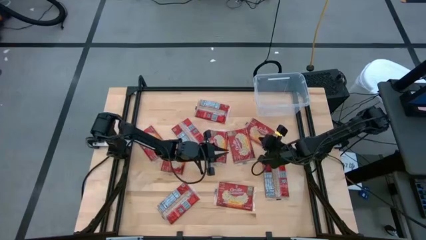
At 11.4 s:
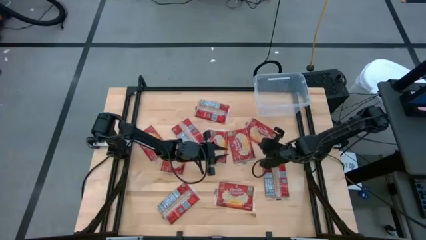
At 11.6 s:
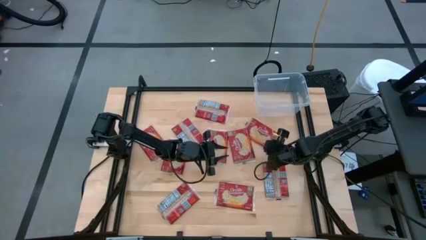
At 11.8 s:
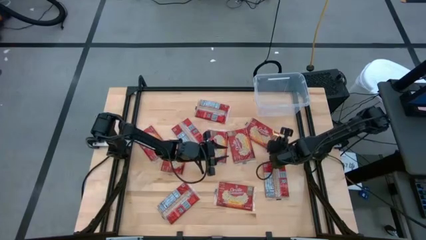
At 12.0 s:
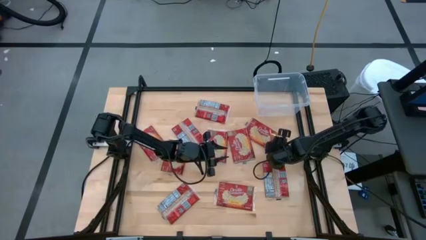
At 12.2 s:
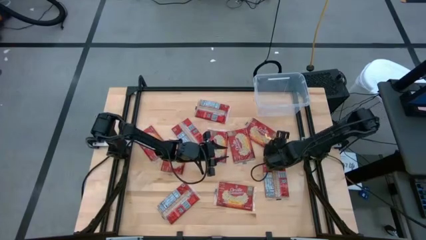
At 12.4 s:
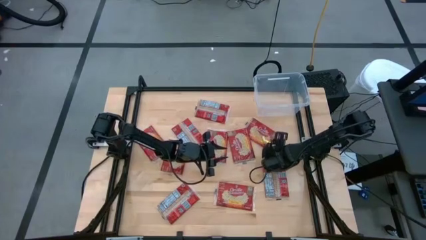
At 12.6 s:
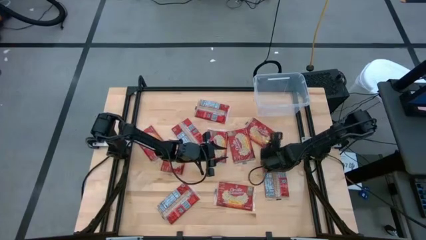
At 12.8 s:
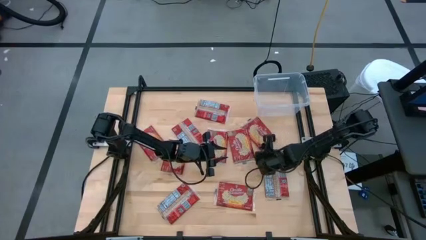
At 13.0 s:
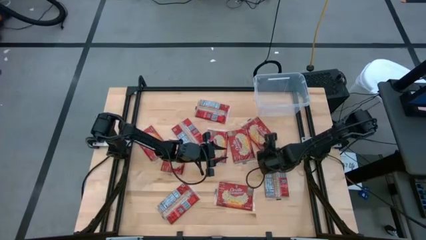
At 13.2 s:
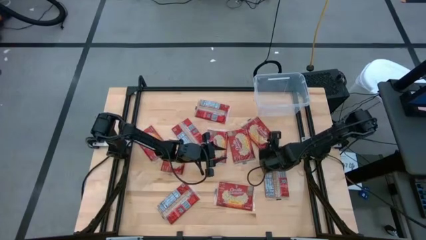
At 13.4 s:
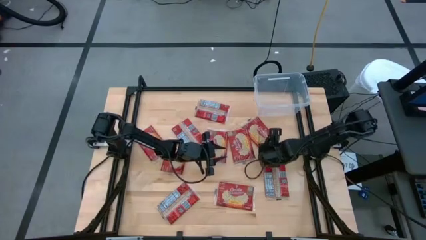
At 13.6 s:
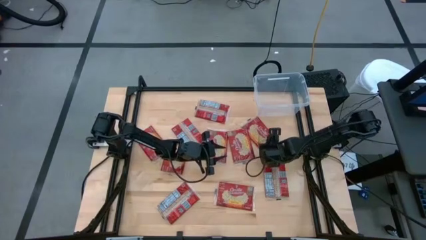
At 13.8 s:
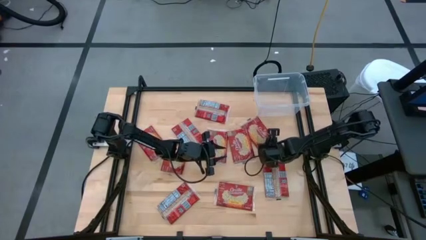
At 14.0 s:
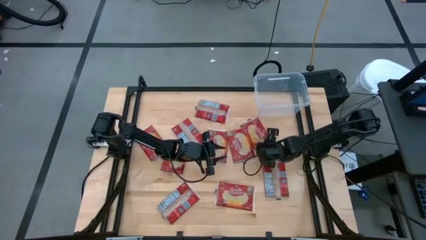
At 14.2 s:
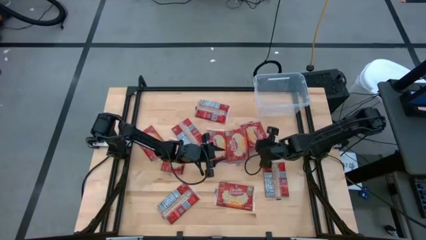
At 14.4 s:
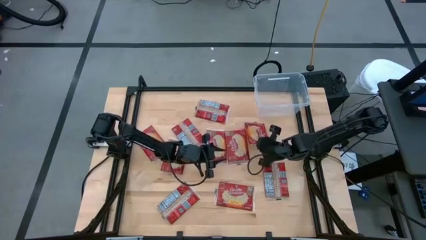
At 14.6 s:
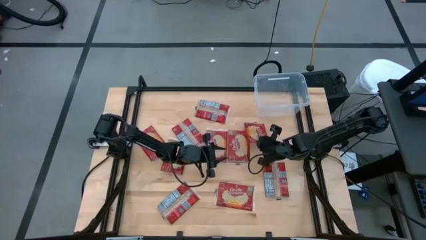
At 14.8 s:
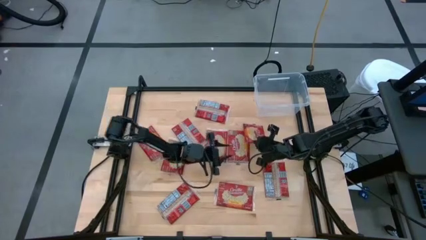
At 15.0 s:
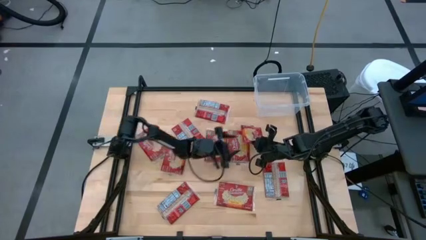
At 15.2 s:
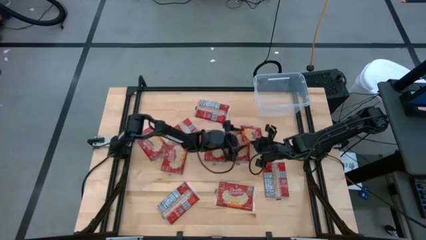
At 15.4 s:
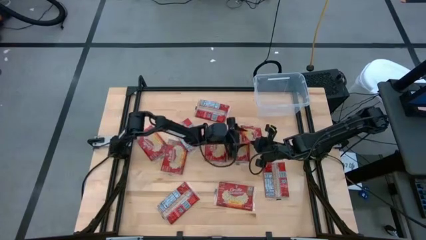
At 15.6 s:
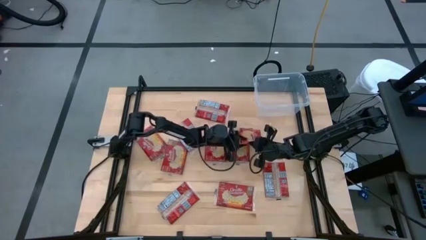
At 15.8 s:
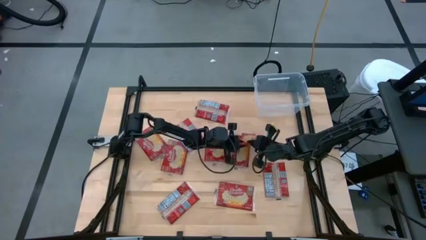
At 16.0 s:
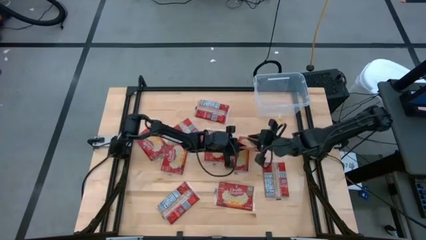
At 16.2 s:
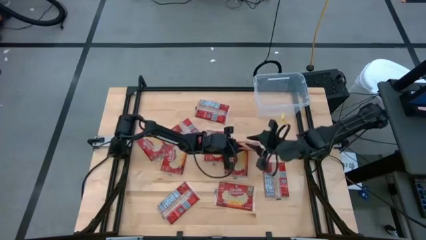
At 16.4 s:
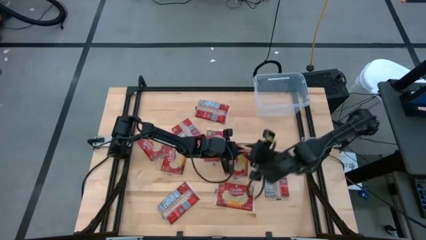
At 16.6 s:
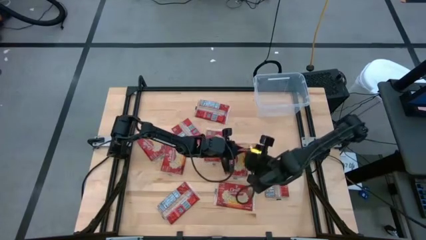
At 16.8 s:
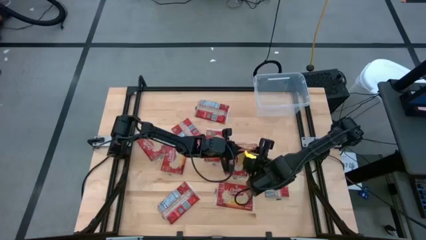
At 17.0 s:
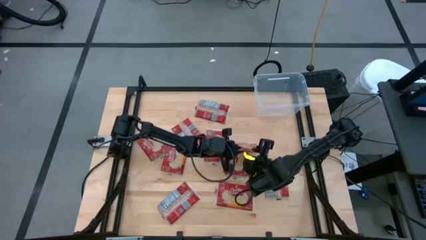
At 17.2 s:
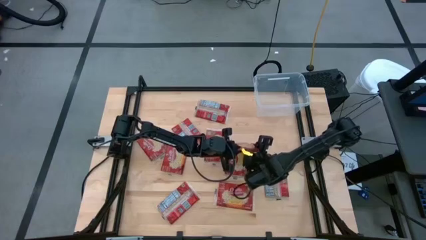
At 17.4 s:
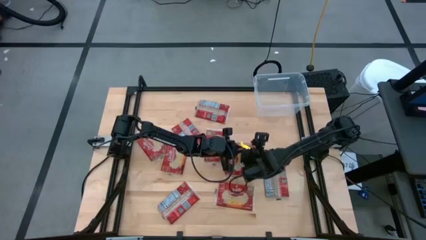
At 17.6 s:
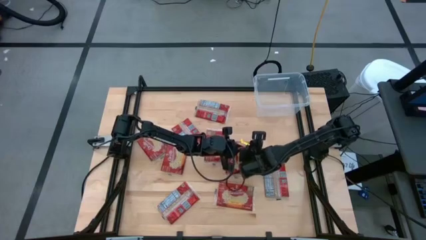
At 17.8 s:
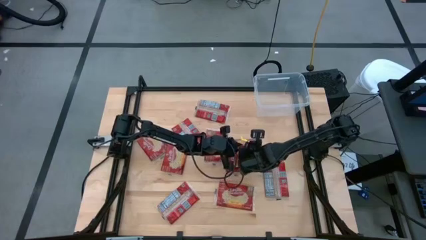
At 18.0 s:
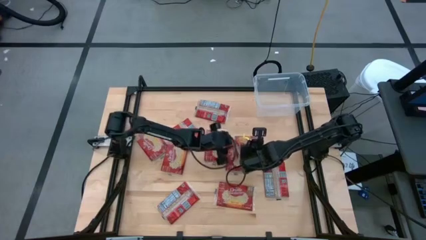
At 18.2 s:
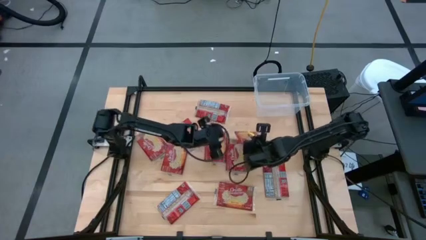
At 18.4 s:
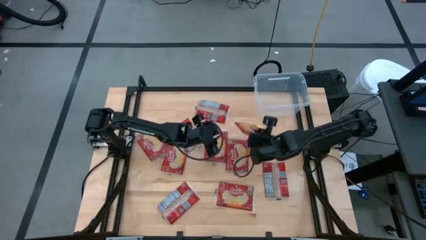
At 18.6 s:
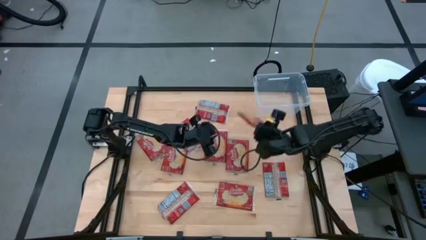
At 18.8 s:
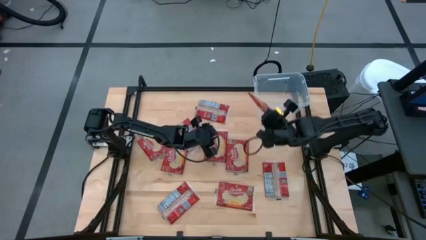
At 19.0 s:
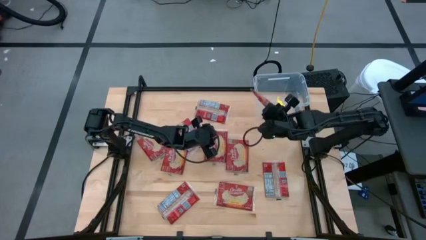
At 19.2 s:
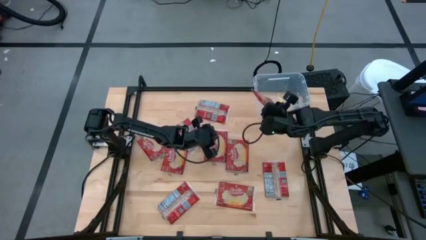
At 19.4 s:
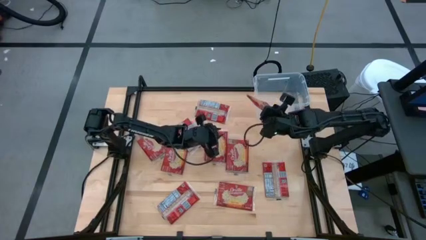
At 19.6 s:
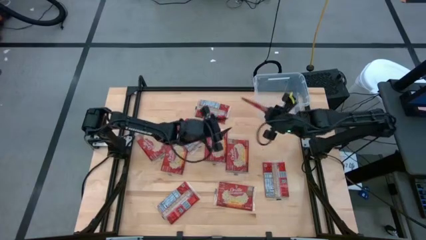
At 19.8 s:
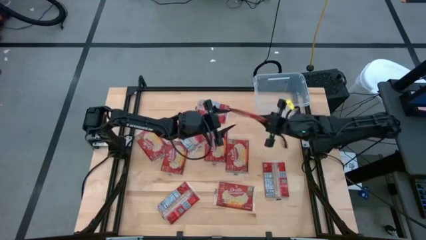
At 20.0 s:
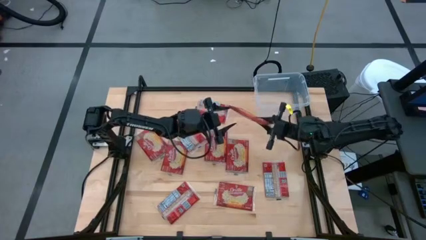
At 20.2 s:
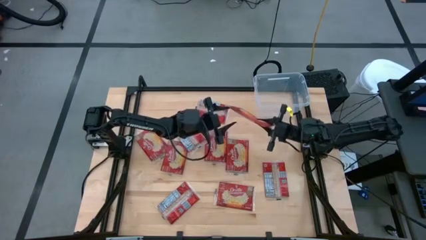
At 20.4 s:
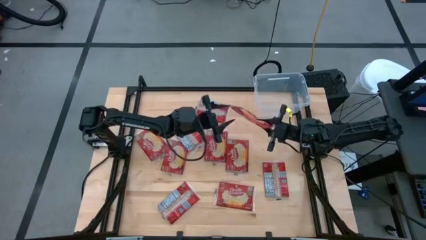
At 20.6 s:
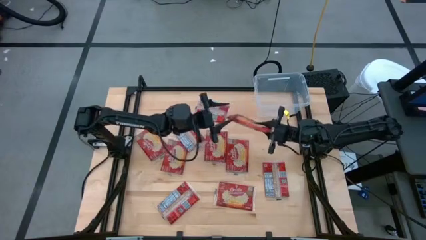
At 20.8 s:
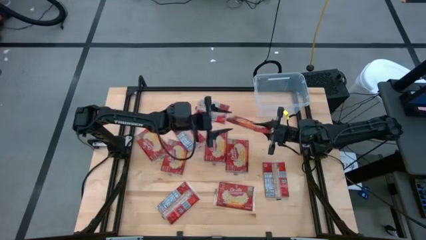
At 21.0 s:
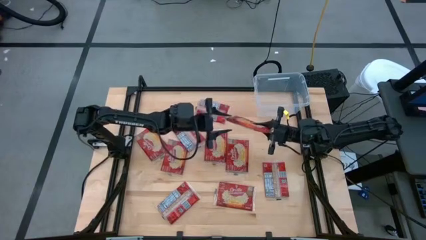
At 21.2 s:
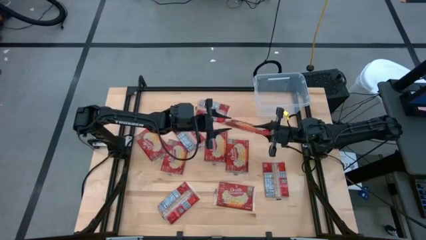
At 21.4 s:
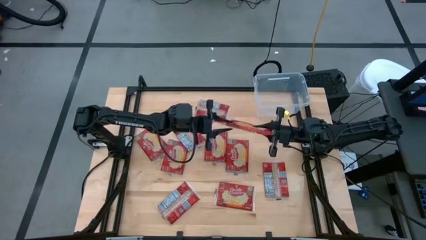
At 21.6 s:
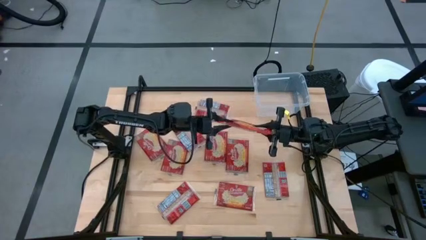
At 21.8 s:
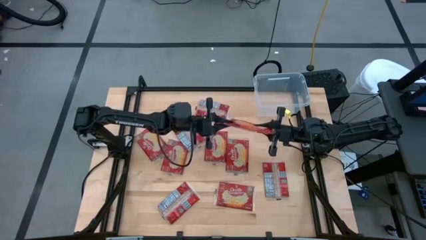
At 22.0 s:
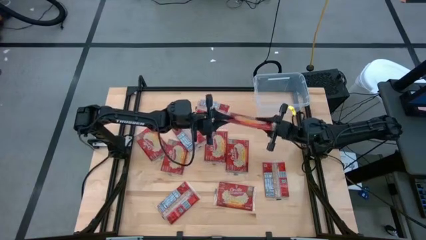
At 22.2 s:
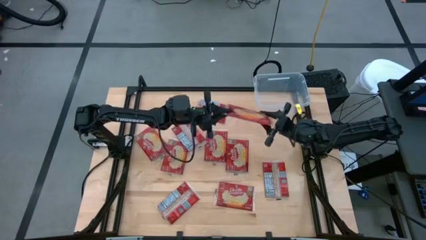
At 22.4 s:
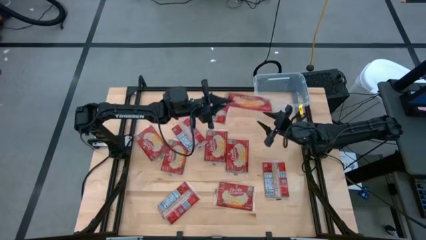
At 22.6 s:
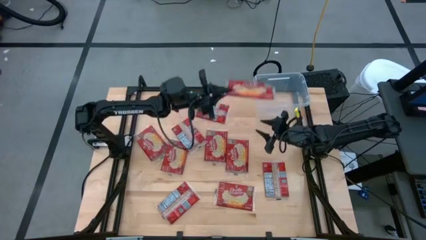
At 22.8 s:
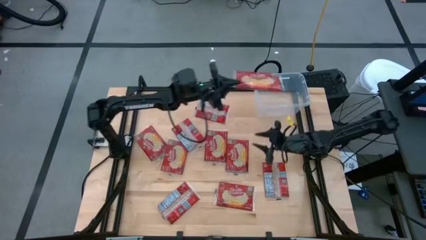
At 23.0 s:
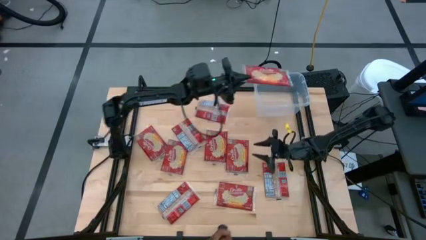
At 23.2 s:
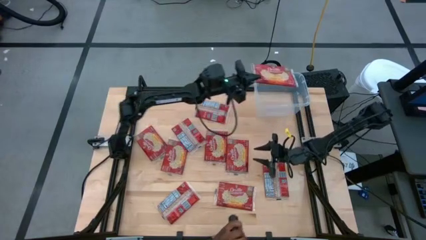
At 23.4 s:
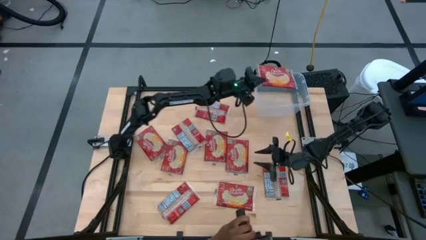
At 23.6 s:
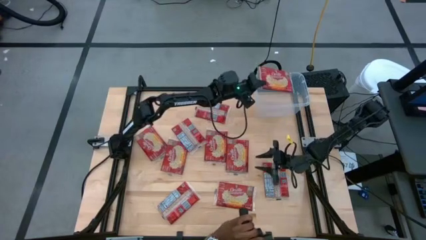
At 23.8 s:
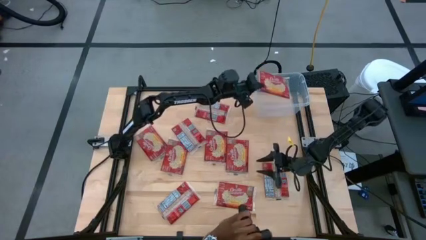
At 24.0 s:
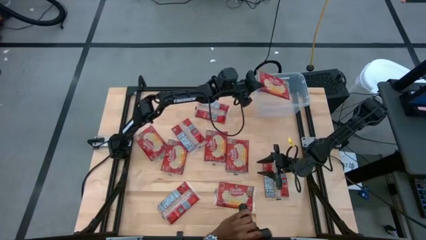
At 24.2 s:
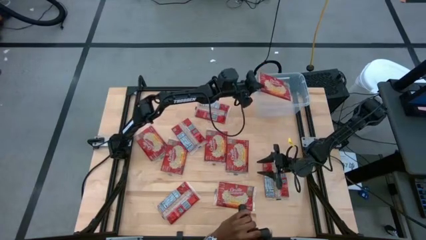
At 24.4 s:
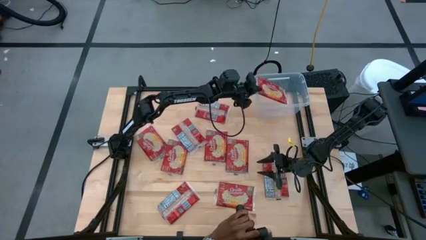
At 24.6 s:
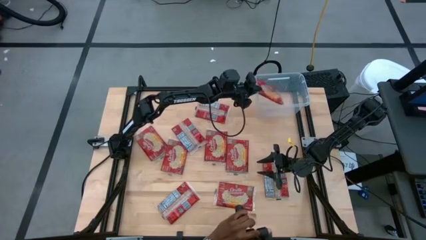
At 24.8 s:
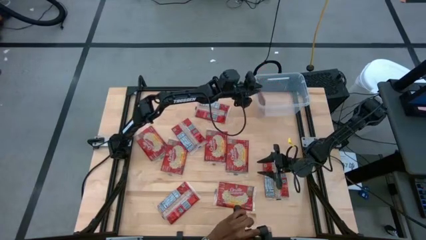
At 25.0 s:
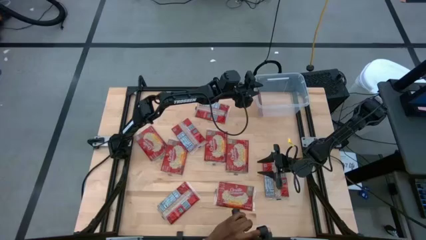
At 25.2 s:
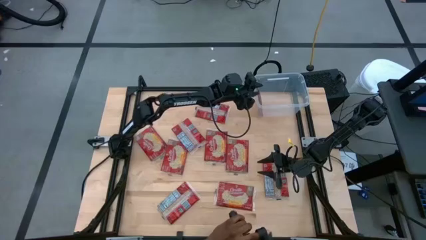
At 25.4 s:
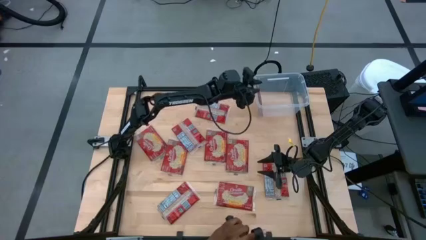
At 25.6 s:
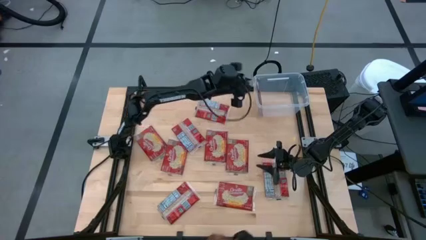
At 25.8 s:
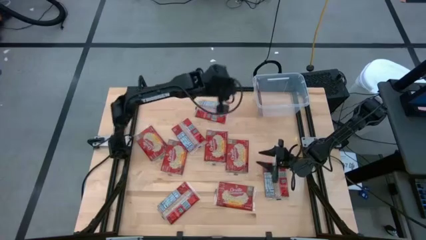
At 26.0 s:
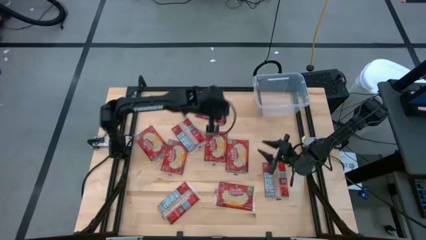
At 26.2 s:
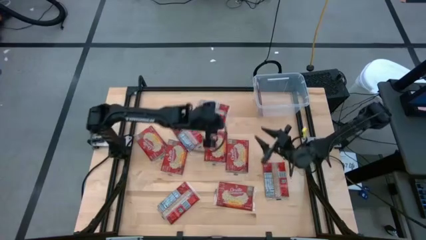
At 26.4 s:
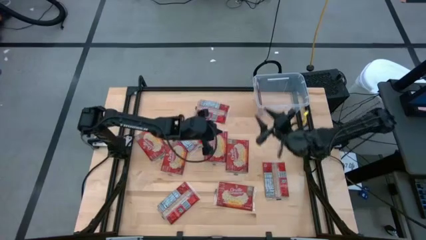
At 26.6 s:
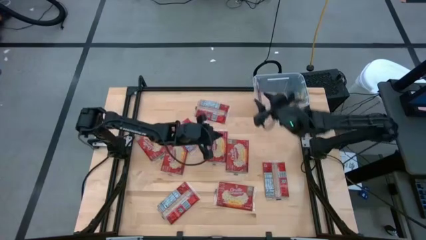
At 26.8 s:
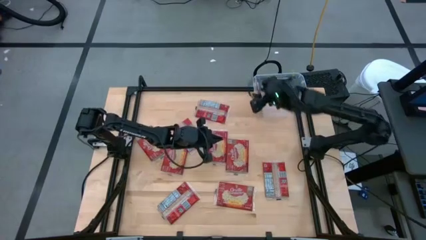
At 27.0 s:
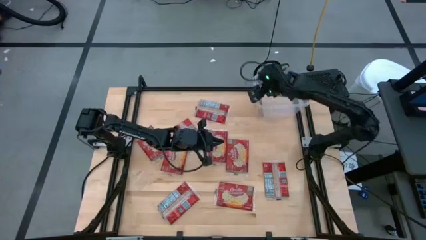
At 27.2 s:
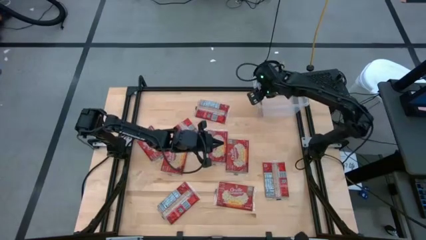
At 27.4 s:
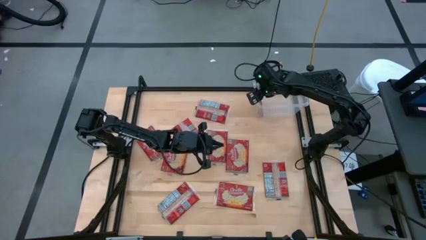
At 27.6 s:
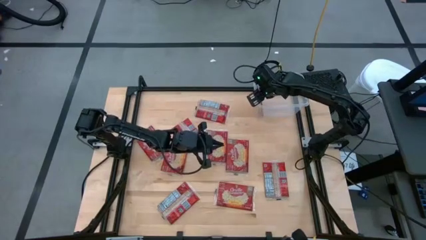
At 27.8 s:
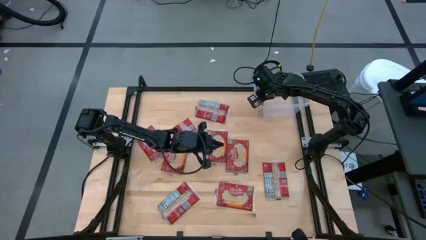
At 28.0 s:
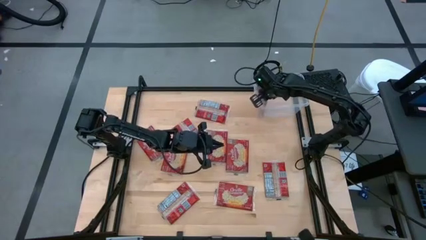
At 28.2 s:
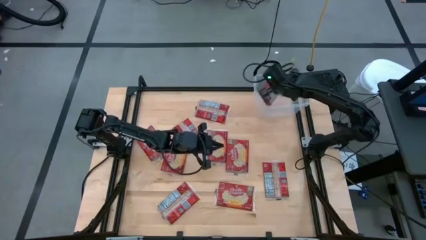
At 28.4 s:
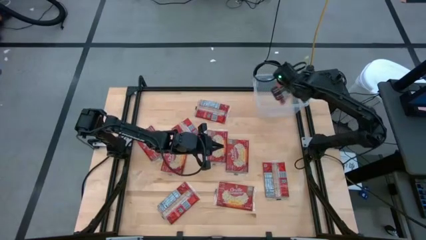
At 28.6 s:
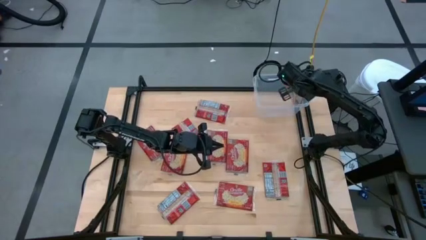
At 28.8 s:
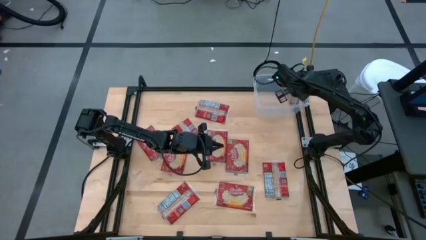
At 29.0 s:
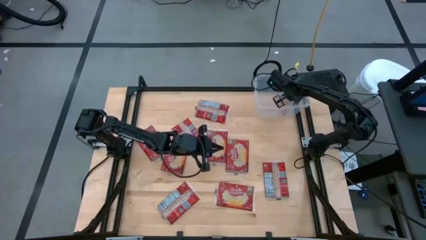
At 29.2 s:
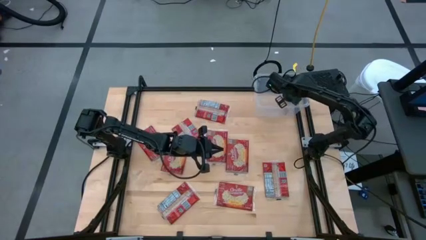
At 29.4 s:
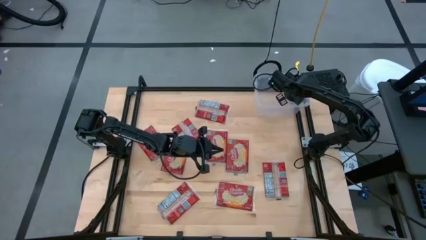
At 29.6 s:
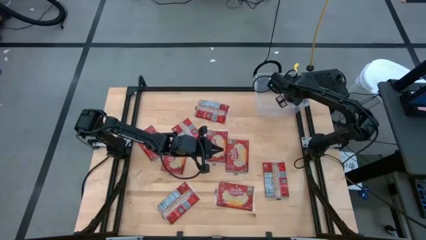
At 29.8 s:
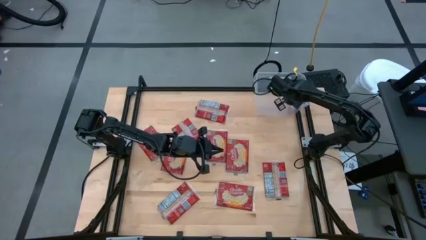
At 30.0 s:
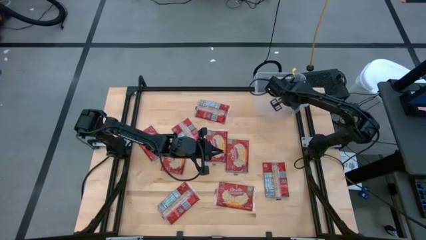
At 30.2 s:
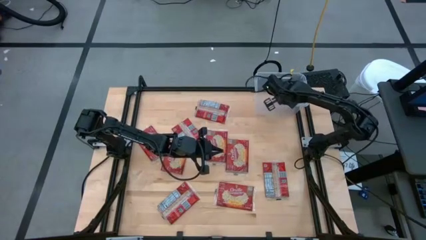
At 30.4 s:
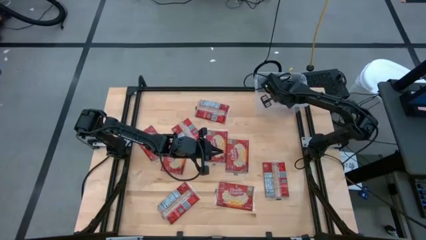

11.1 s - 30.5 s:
Task: Sort popcorn bags into baskets
Put the popcorn bag into the transparent container
